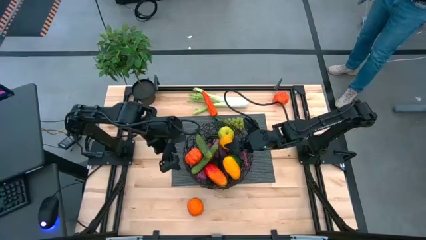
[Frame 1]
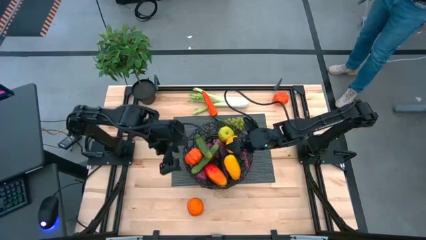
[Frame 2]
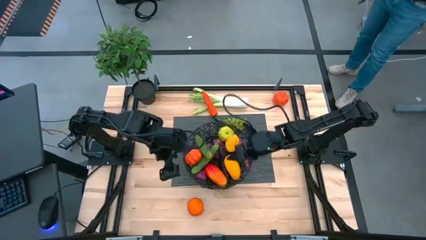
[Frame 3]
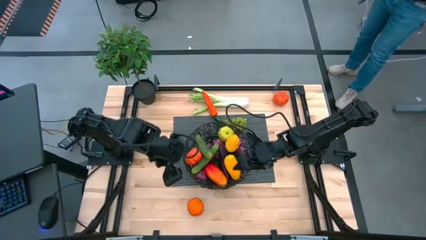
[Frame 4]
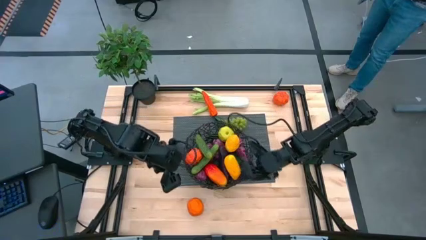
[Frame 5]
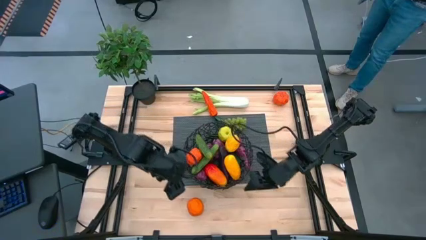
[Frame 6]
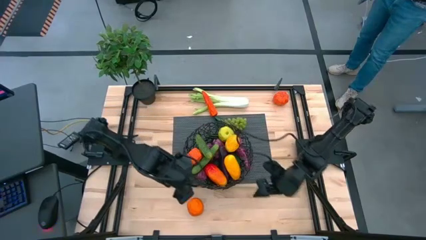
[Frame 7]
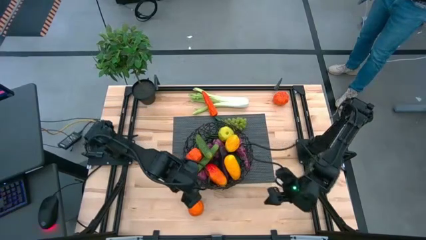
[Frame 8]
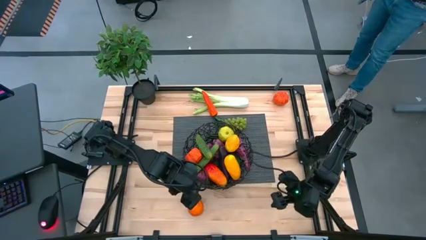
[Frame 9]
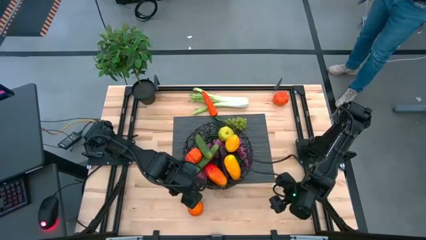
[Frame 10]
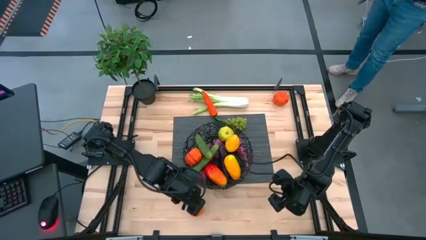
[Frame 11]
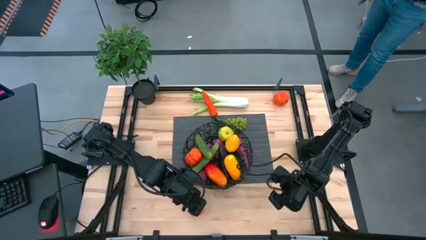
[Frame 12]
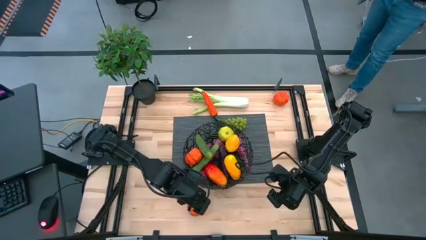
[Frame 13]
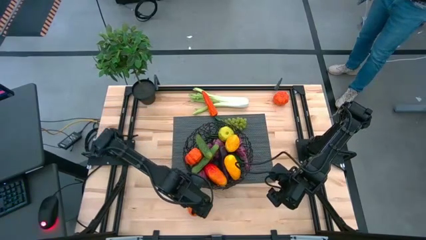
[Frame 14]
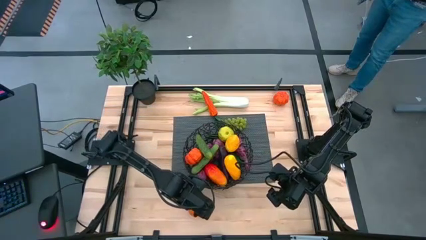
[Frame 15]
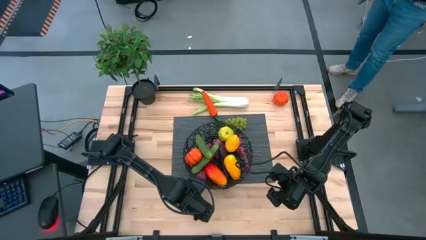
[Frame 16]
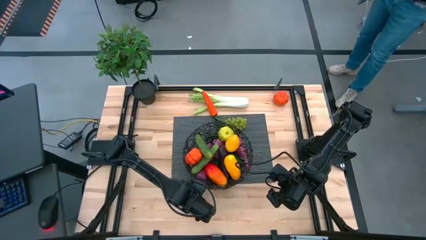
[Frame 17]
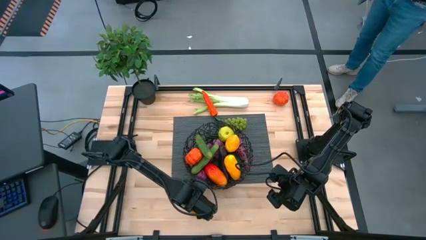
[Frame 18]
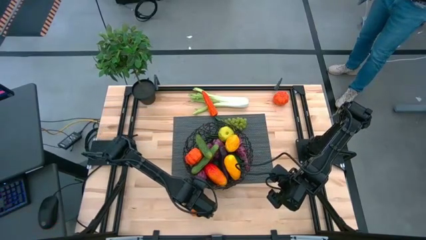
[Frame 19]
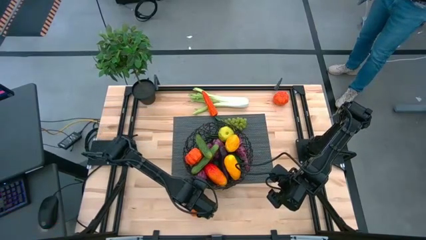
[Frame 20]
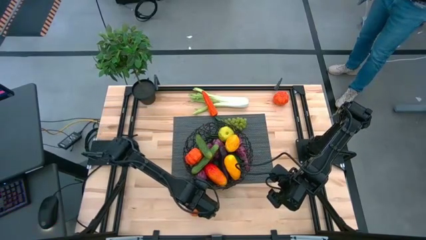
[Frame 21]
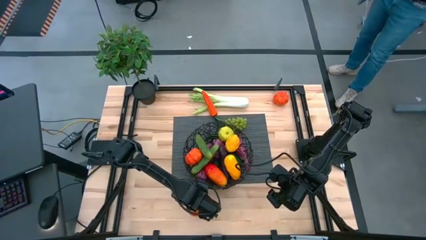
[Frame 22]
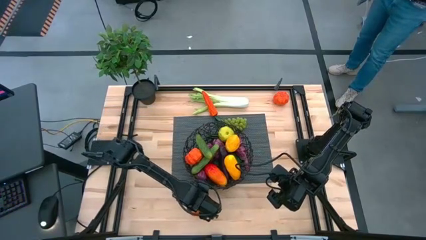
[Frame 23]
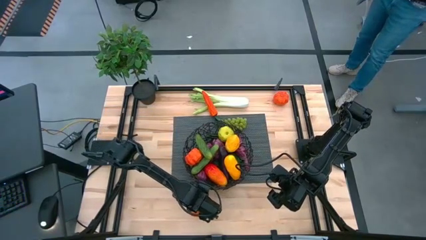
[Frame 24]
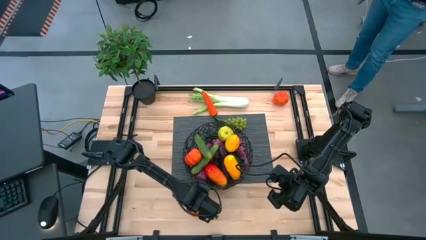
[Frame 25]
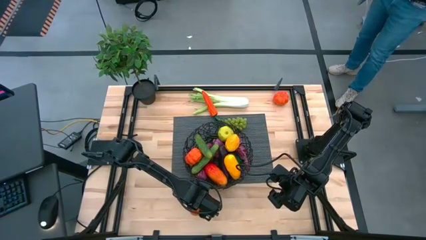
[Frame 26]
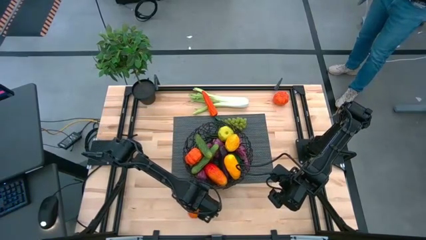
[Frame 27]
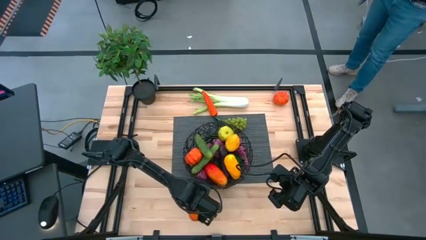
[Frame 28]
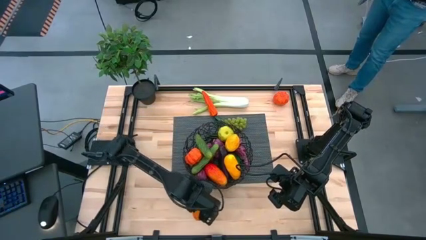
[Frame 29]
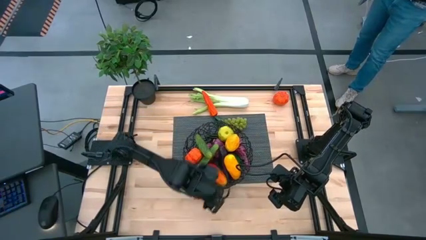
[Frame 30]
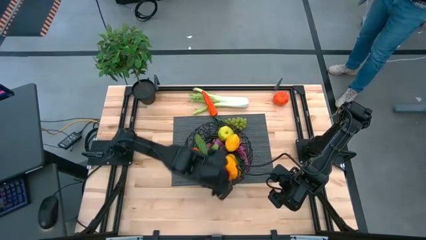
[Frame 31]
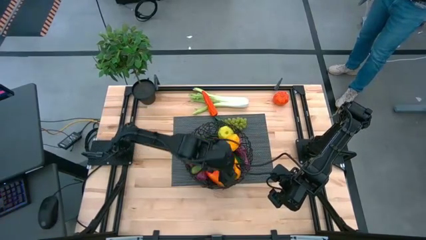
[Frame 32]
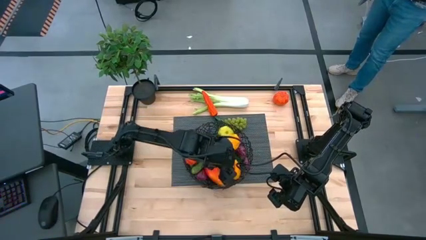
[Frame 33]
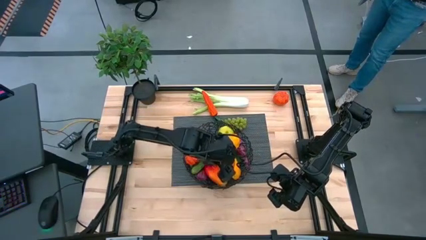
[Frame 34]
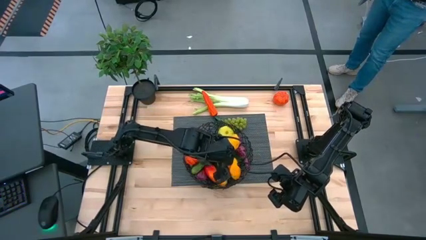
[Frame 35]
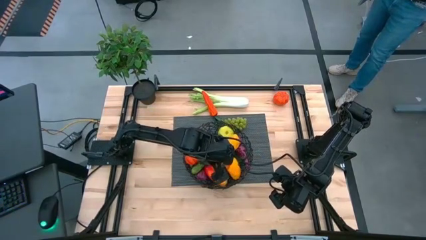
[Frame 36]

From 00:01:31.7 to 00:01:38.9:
Task: Build produce basket
Put the orange into the black wire basket

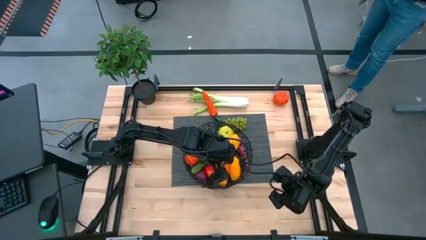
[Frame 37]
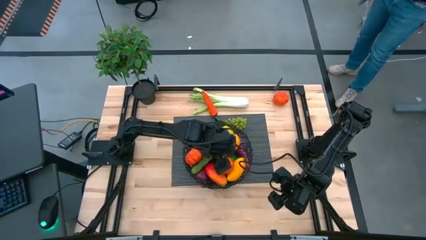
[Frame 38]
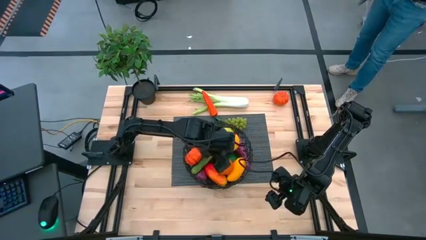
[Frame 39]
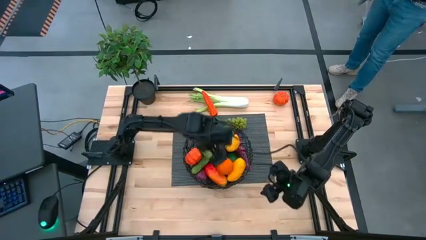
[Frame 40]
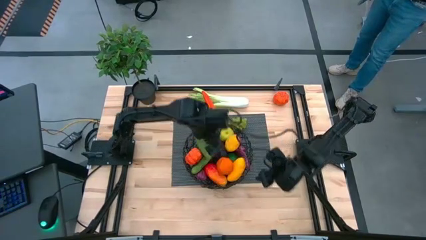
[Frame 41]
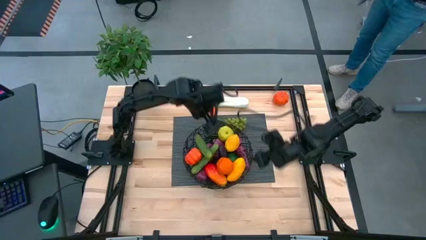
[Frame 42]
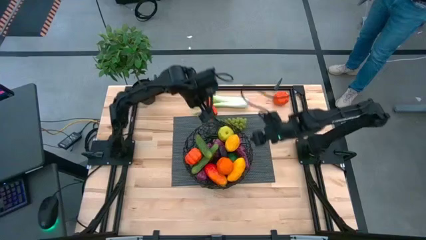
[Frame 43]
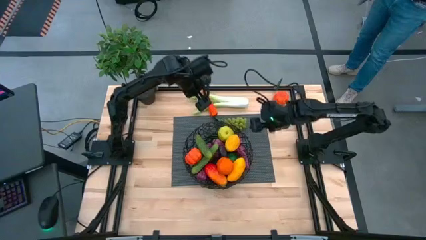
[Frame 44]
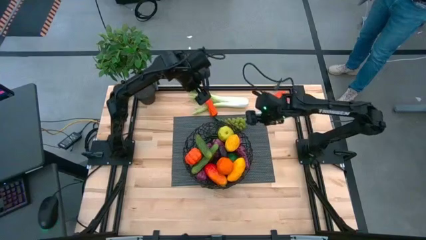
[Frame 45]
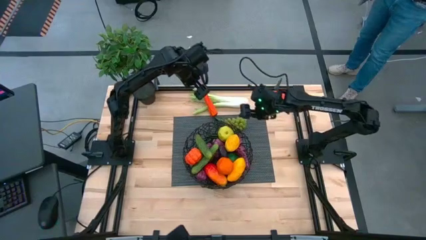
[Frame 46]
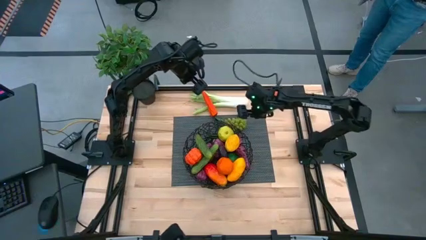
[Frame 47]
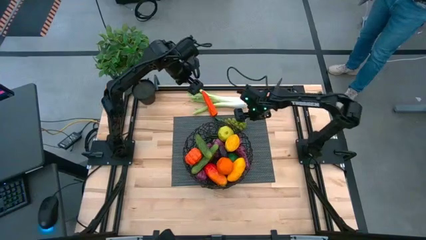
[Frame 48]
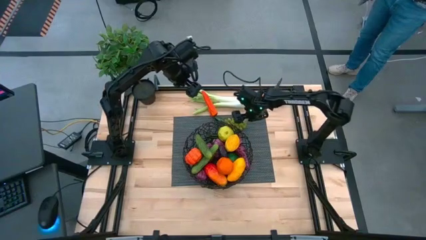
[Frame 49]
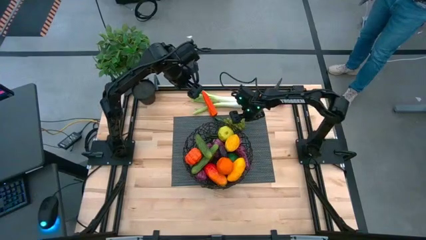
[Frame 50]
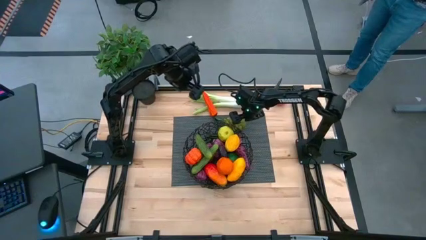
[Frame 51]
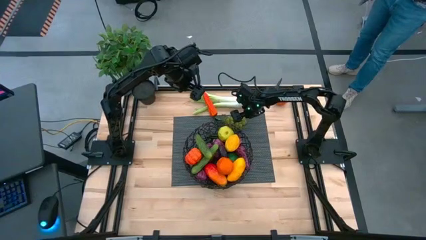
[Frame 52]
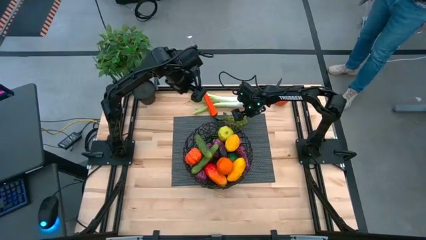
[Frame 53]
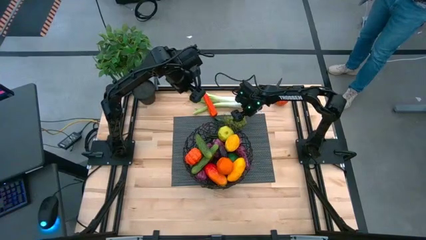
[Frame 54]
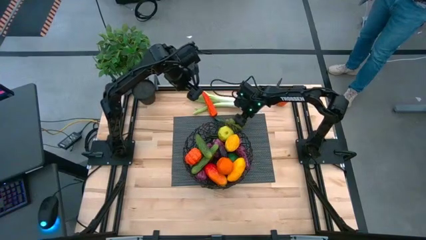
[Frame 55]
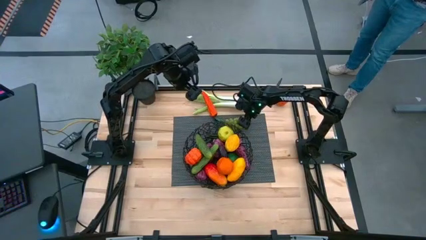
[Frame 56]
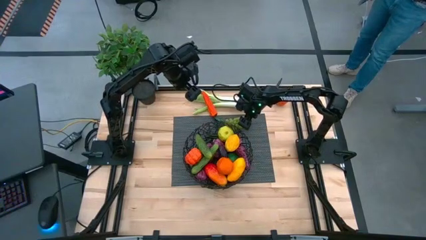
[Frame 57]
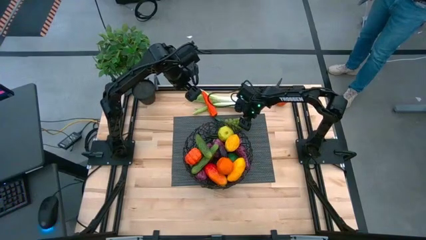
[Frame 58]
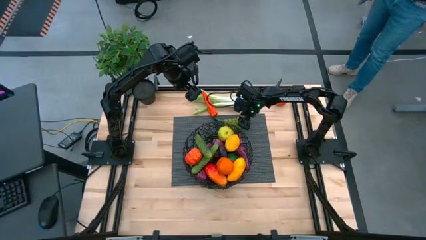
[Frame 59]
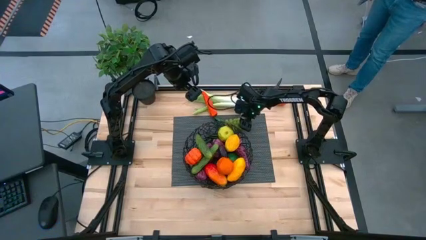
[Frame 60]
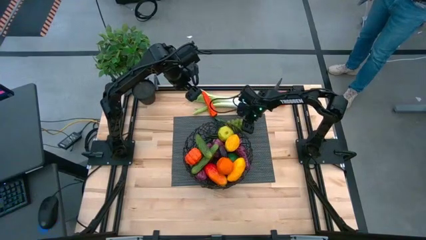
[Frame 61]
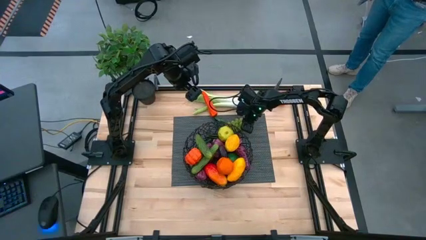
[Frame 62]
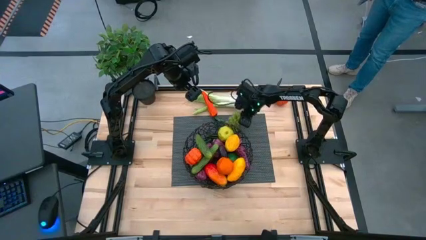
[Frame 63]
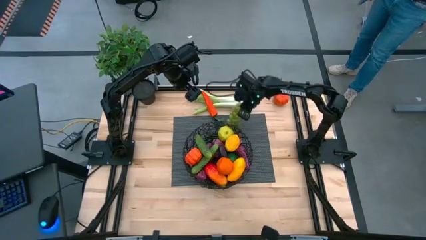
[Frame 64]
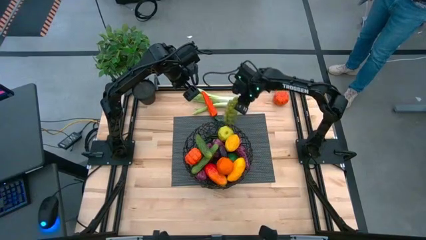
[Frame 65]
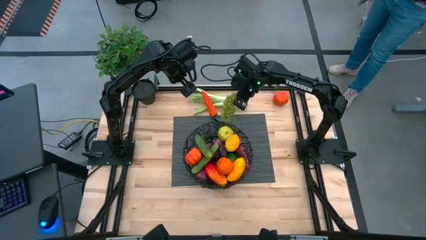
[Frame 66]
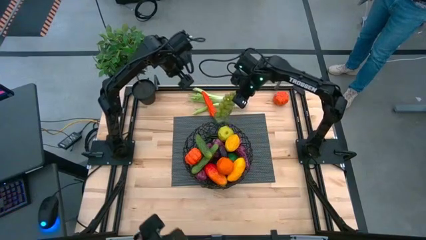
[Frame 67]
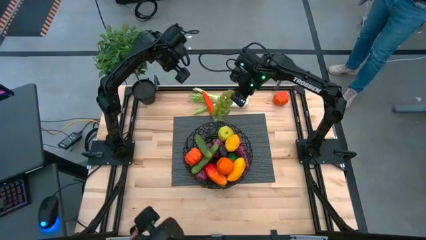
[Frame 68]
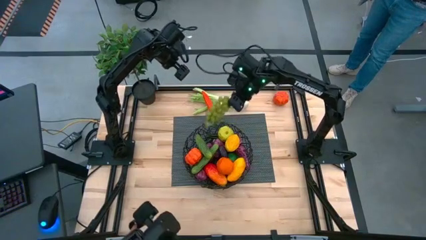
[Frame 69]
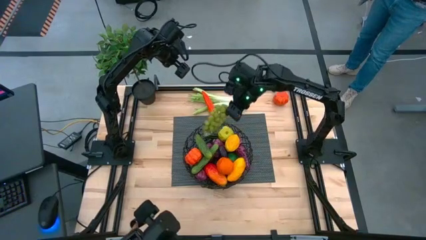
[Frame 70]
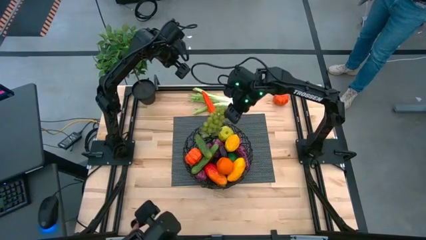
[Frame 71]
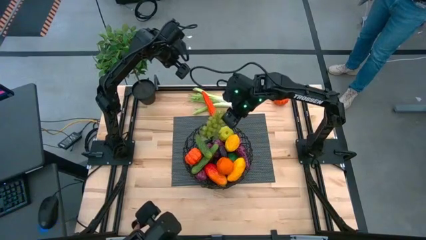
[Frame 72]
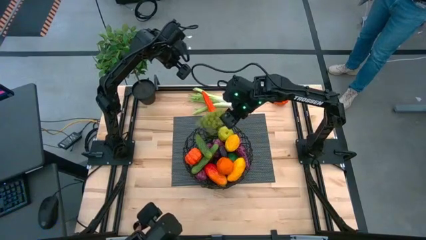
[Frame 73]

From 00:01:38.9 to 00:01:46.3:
Put the green grapes into the black wire basket
